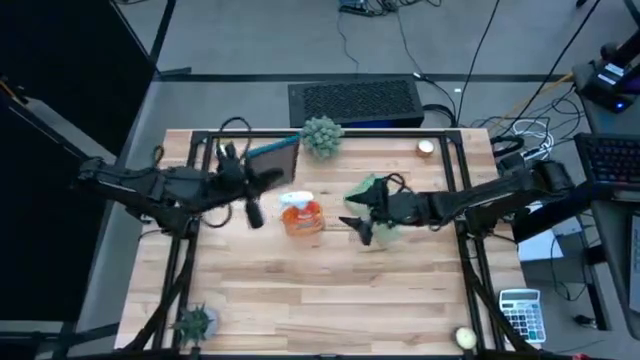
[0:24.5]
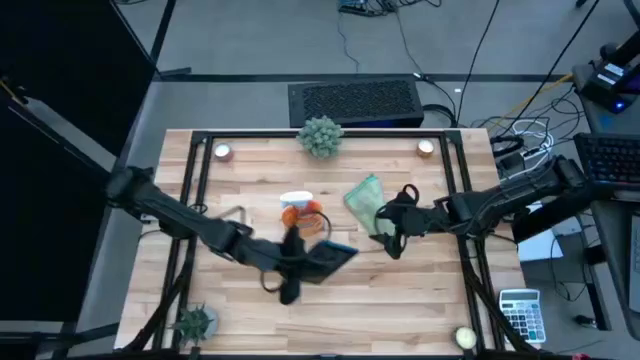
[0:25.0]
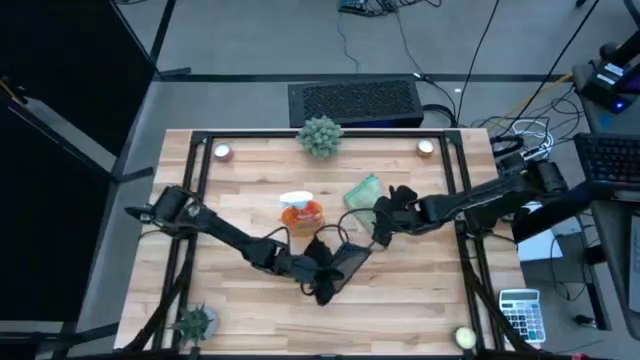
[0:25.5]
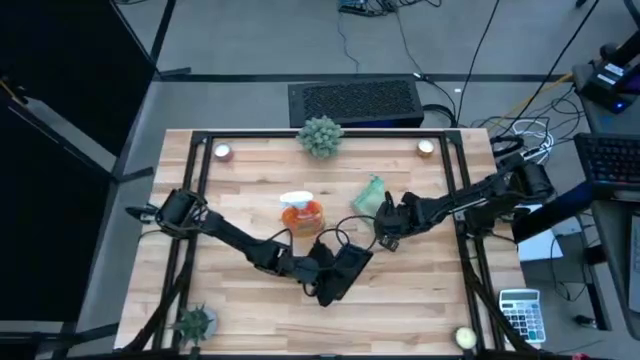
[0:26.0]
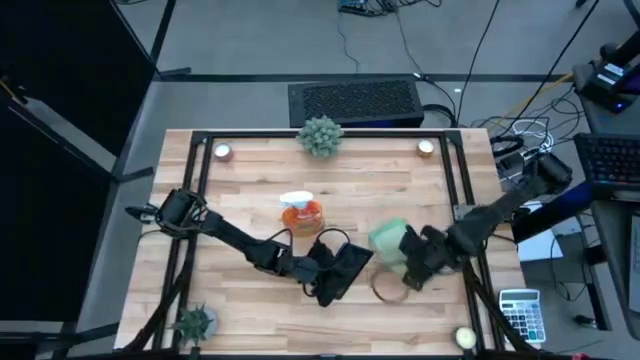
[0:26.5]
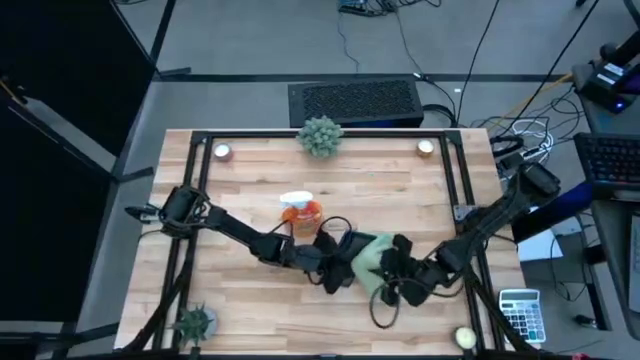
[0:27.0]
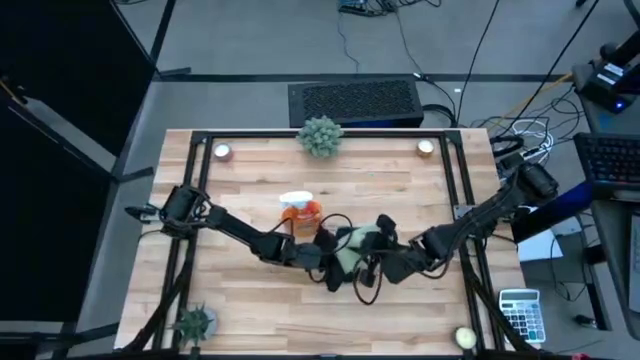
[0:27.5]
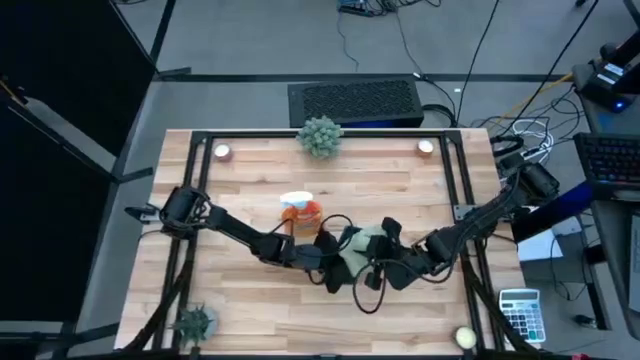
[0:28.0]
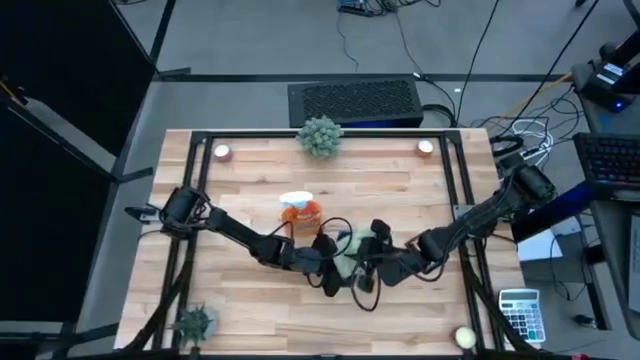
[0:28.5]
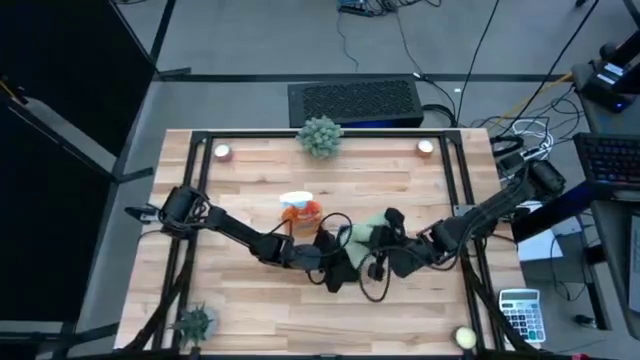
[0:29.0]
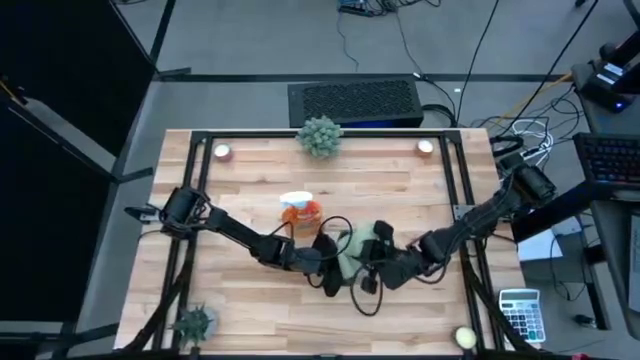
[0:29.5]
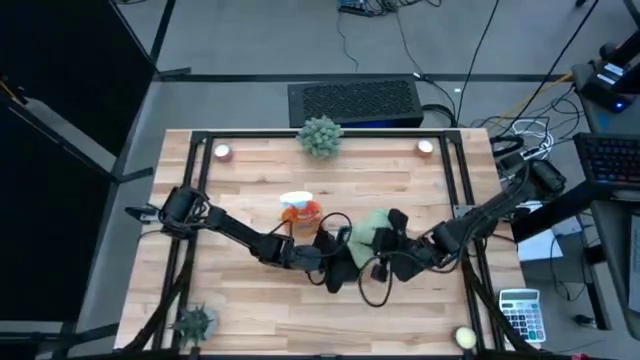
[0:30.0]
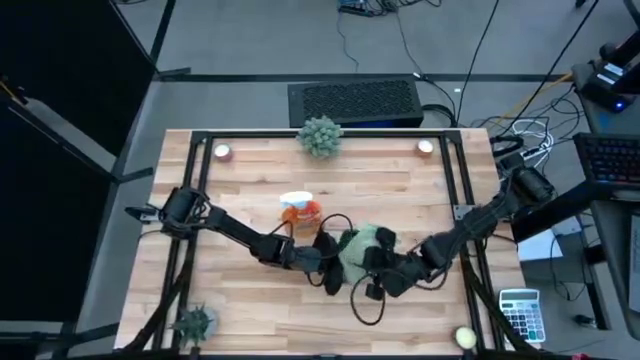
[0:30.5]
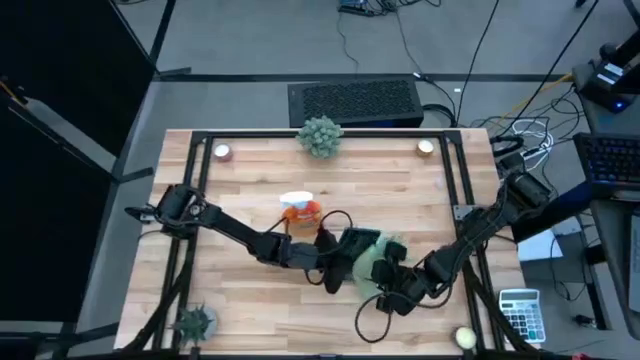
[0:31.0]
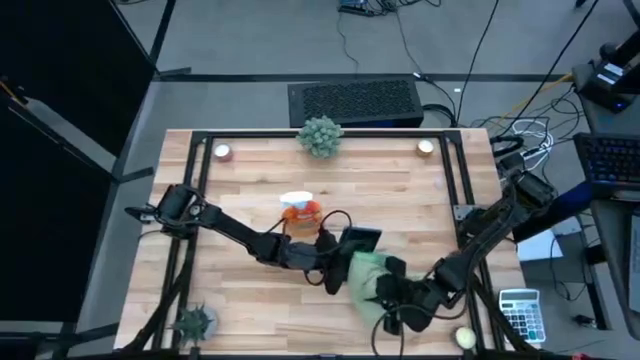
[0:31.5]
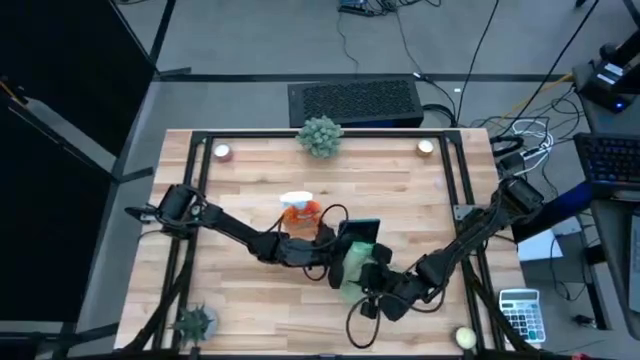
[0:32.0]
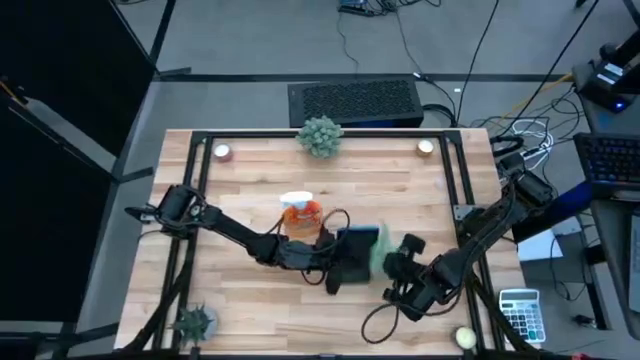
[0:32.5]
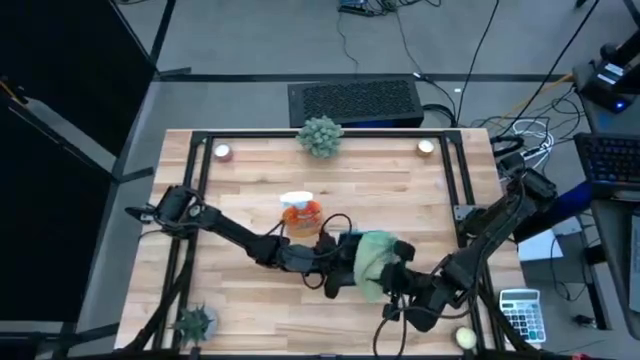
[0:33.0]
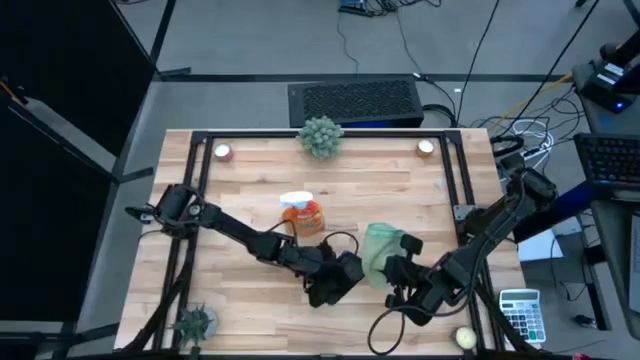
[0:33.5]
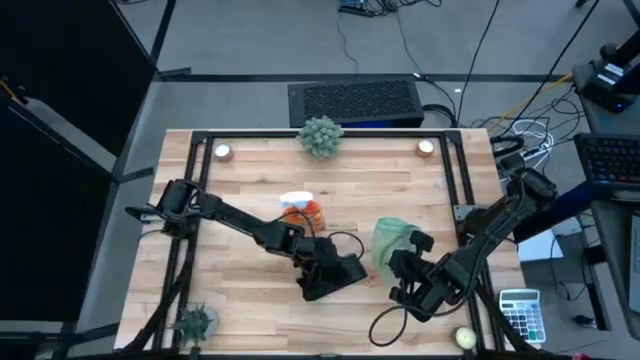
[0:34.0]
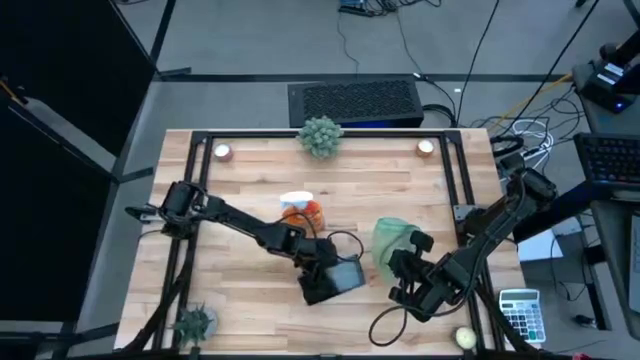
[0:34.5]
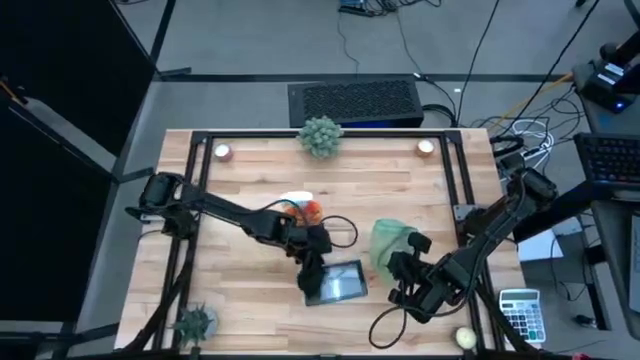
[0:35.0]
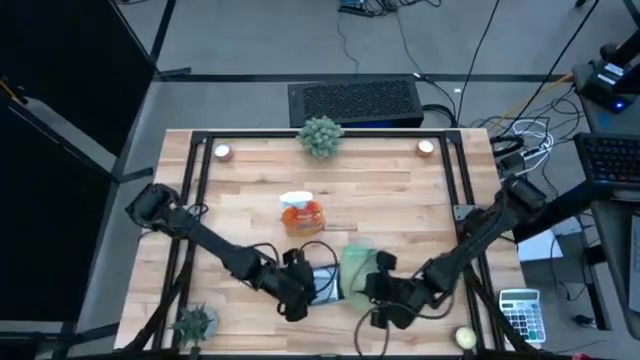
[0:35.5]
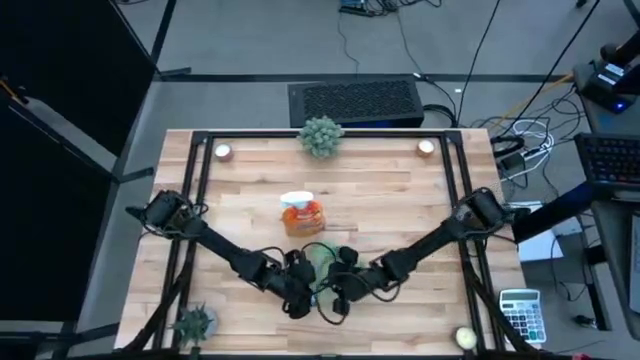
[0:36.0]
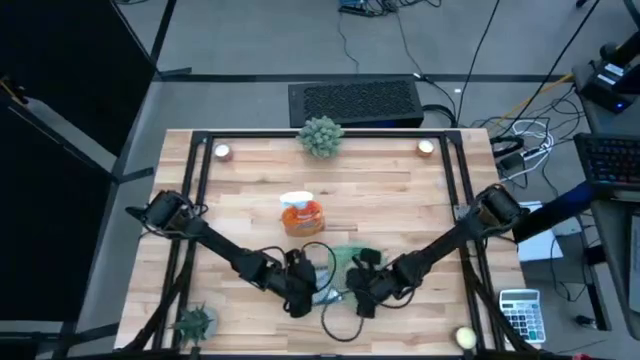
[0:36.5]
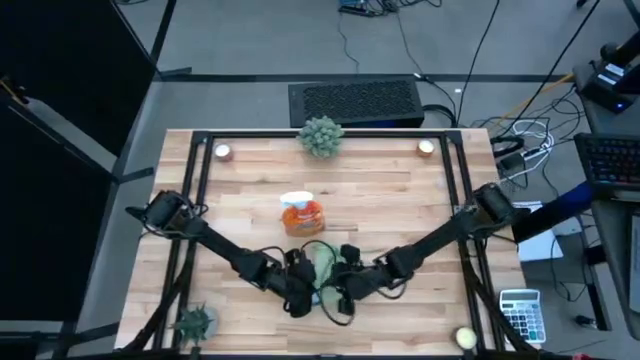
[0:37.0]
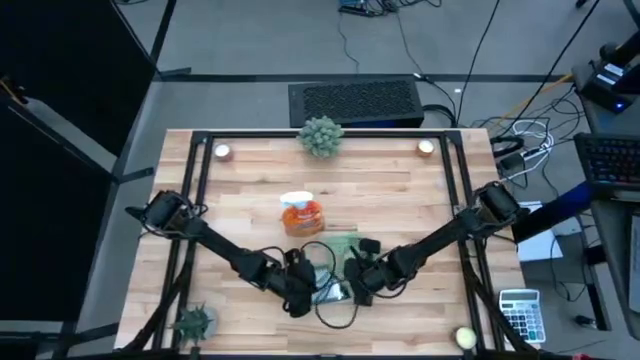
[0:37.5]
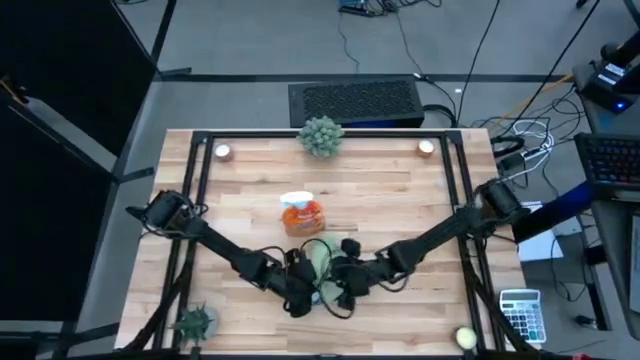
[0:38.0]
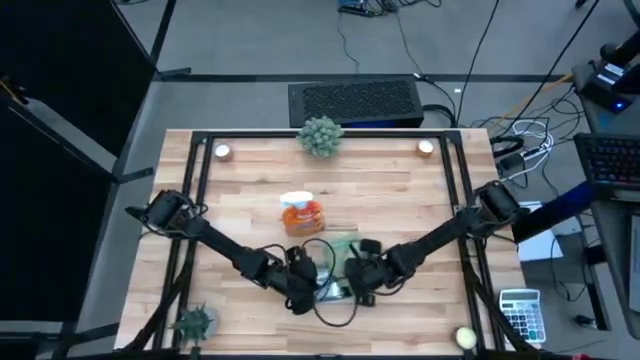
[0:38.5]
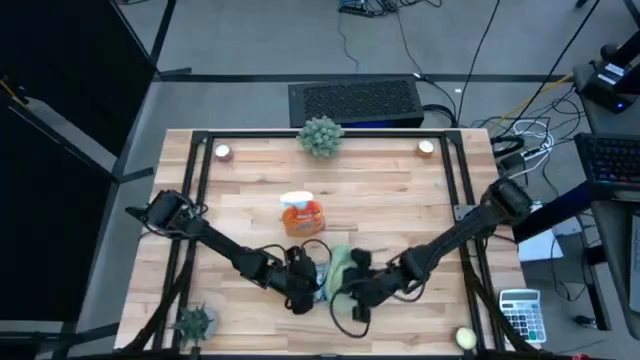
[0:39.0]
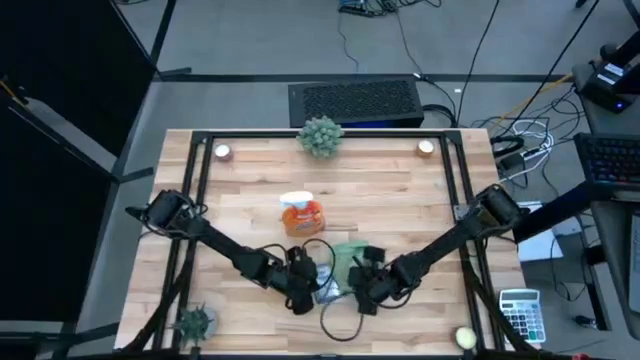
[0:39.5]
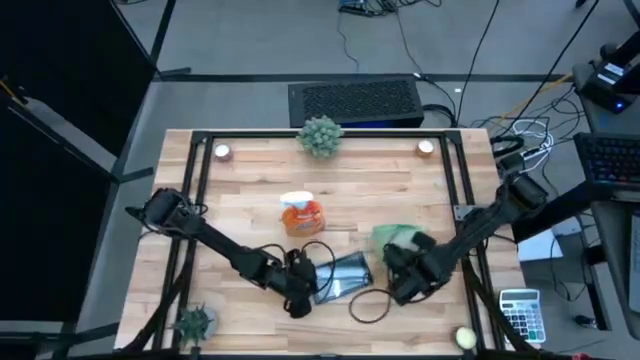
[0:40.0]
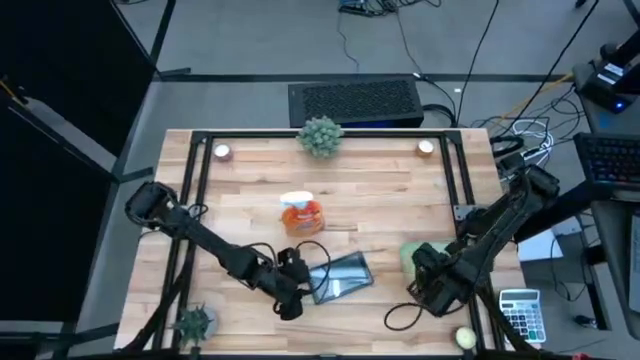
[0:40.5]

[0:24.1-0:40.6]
Task: Apply microfiber cloth
Wipe the front of the cellphone using the microfiber cloth
